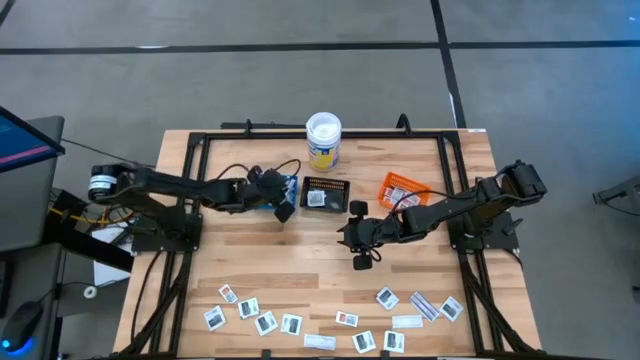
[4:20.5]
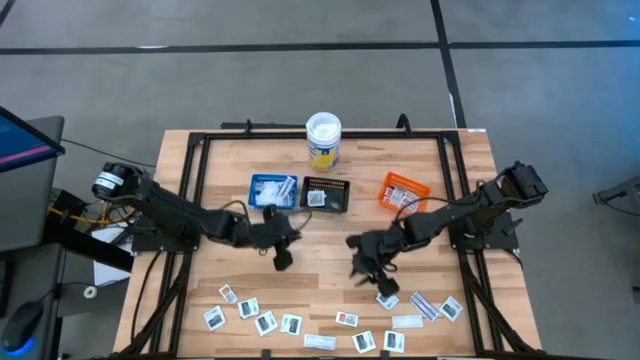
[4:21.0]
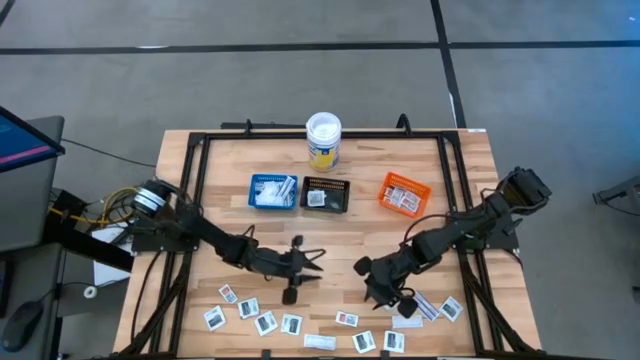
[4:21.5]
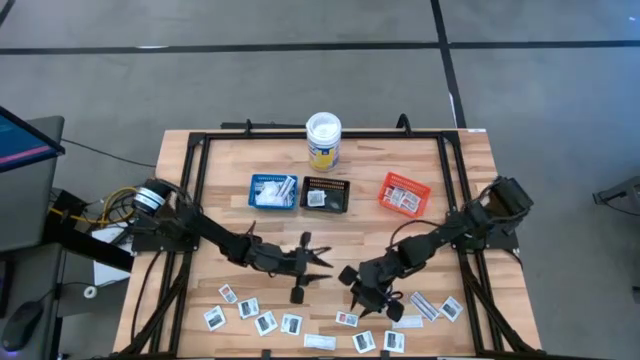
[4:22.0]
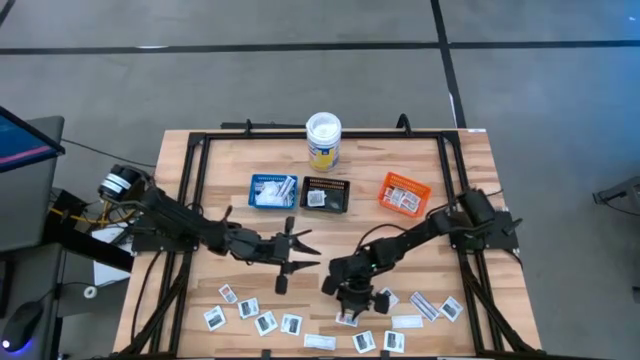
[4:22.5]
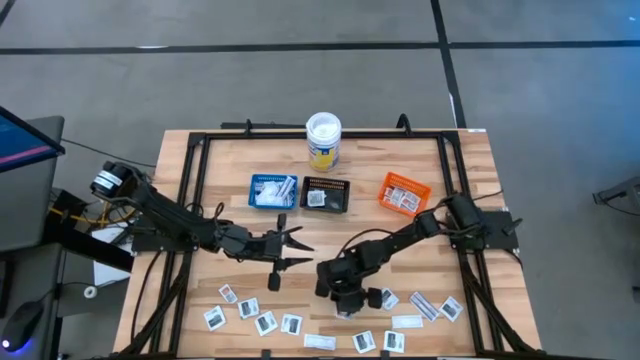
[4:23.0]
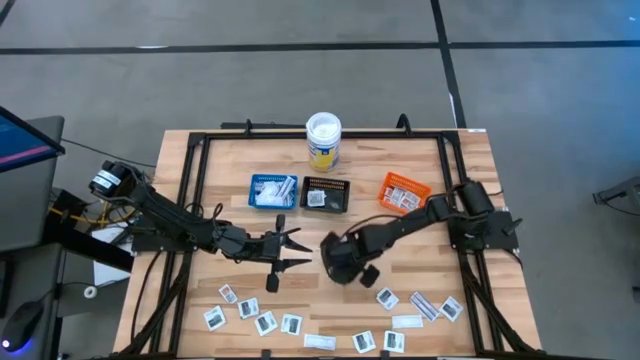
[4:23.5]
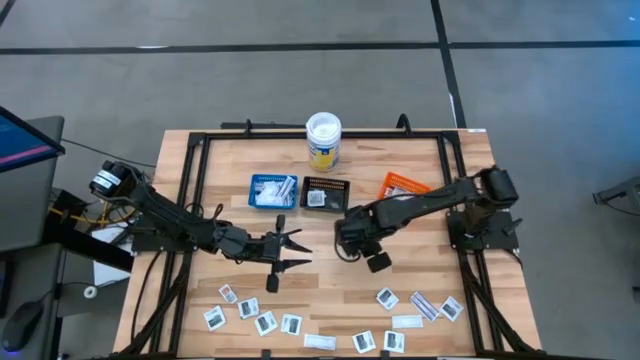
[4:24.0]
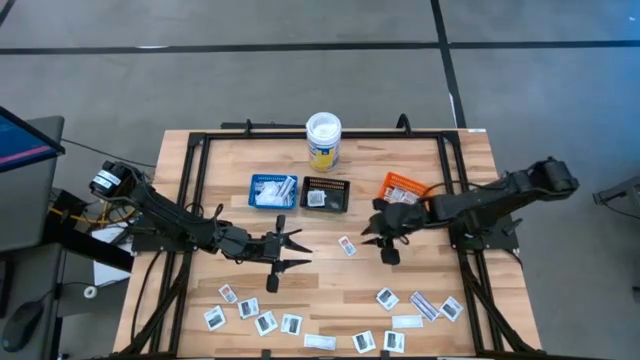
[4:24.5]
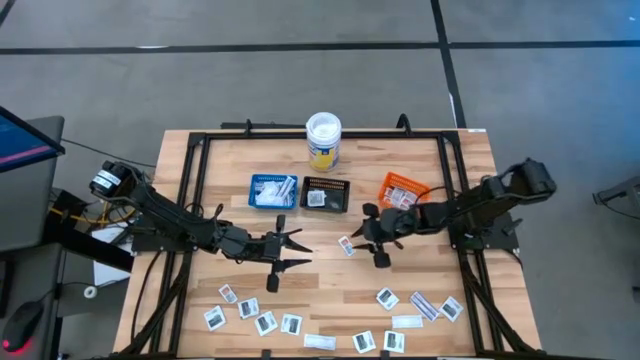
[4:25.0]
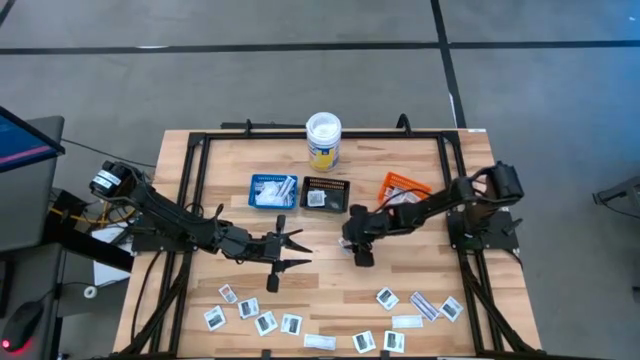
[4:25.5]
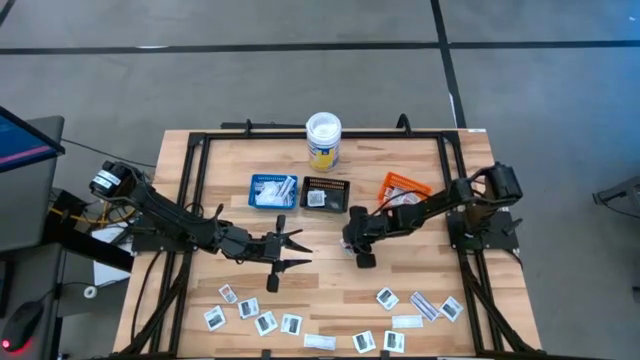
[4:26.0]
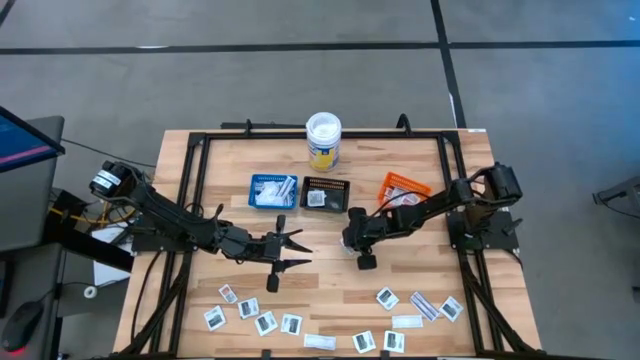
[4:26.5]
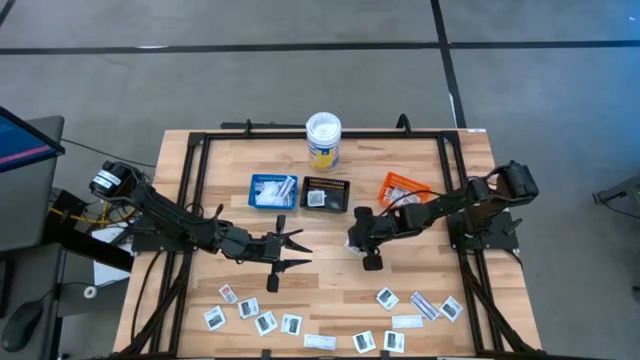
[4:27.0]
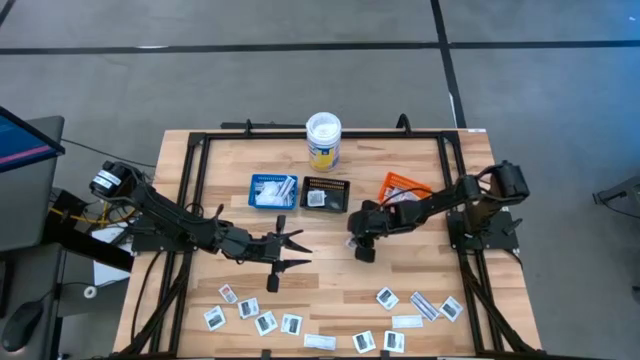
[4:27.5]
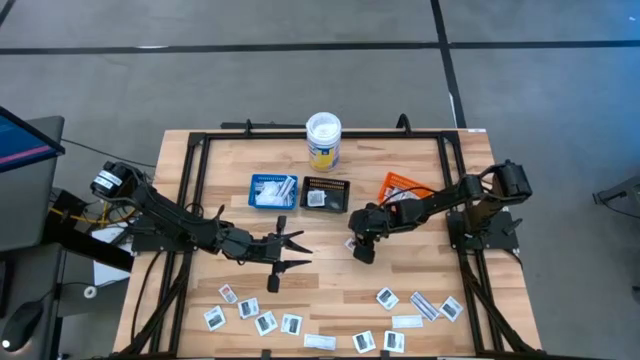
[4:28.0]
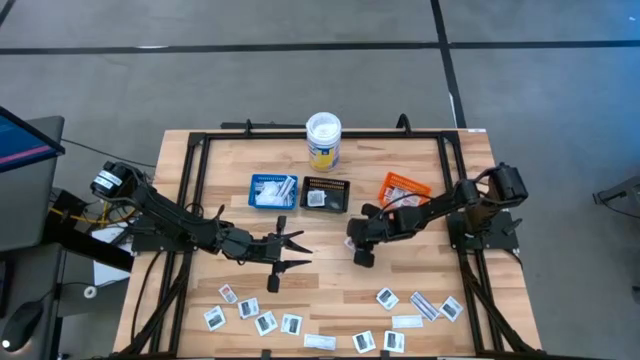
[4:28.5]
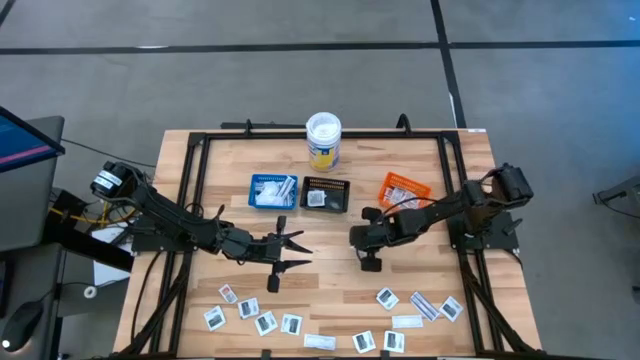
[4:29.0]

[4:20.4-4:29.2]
Task: Pick & Place First Aid Supplies
Put the orange ointment pack into the orange bin

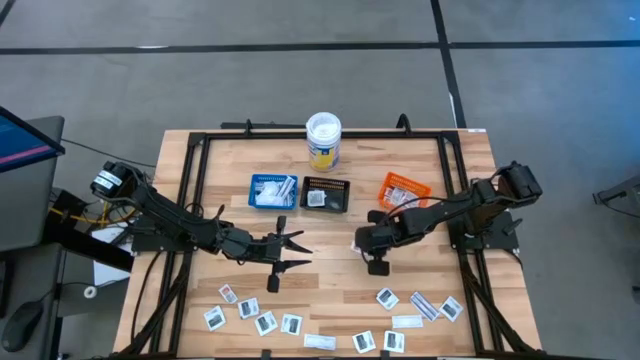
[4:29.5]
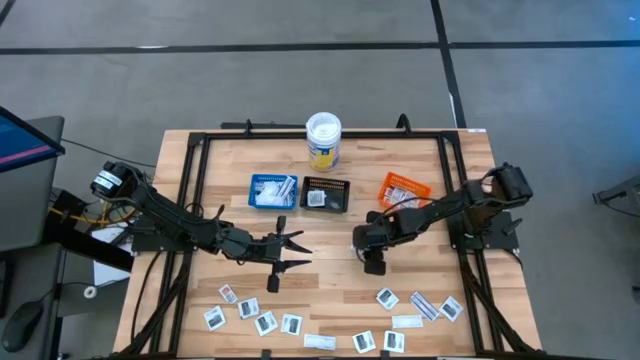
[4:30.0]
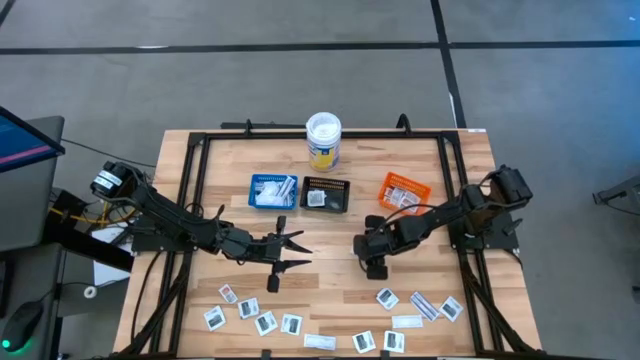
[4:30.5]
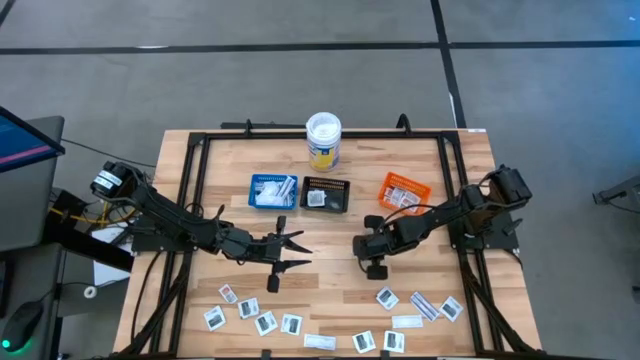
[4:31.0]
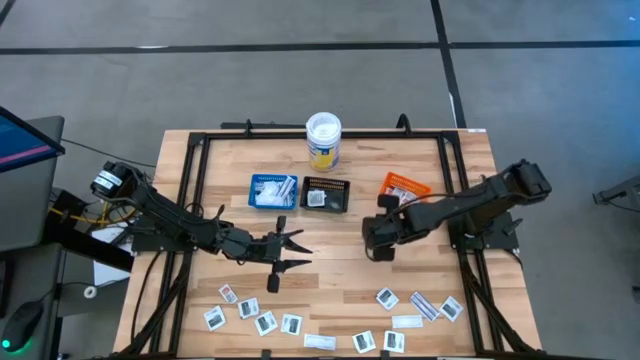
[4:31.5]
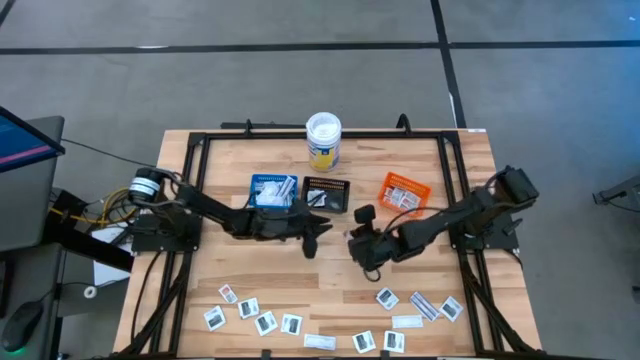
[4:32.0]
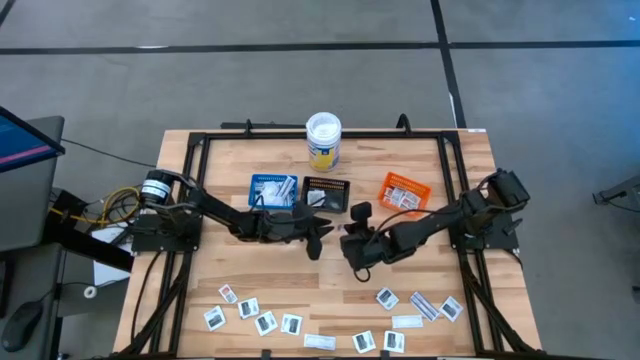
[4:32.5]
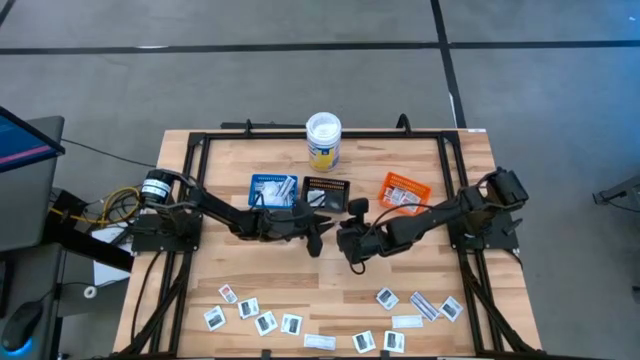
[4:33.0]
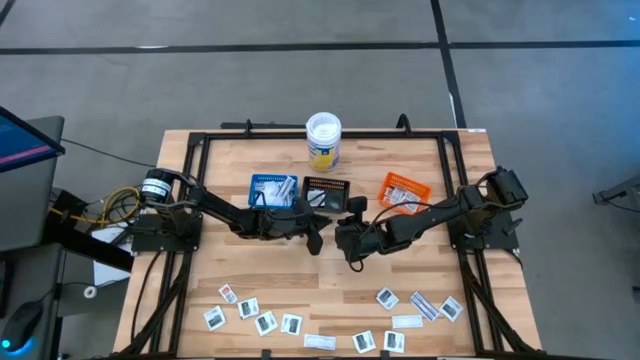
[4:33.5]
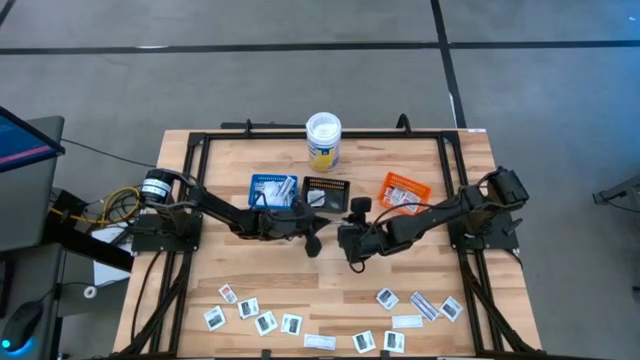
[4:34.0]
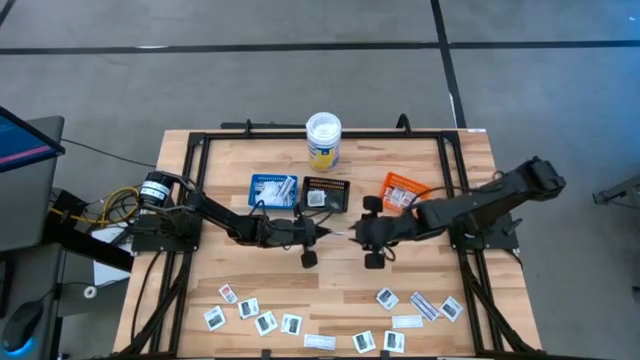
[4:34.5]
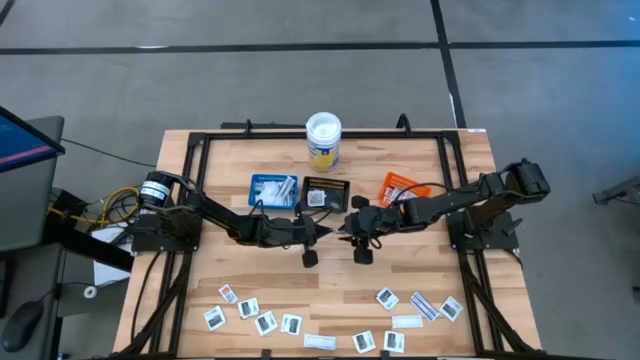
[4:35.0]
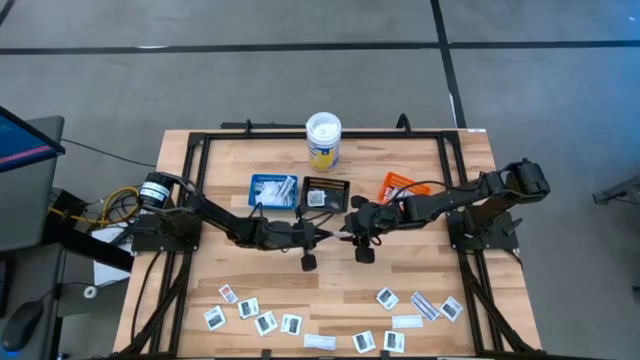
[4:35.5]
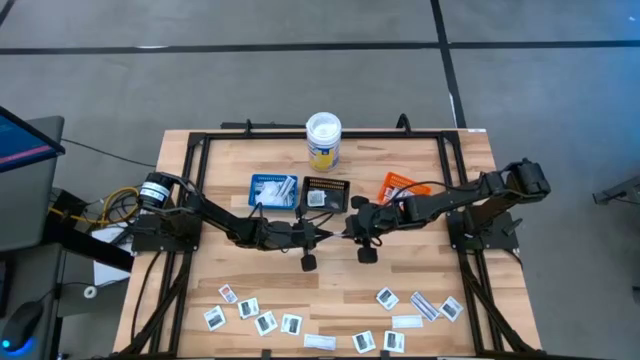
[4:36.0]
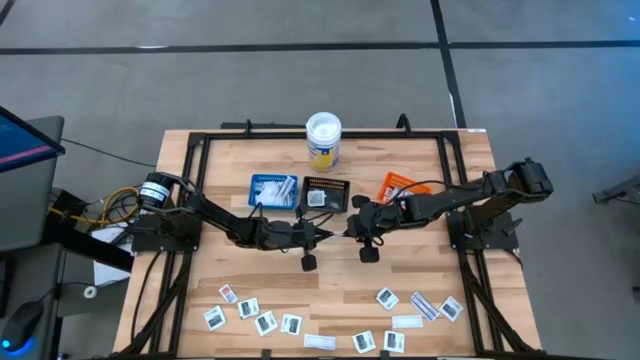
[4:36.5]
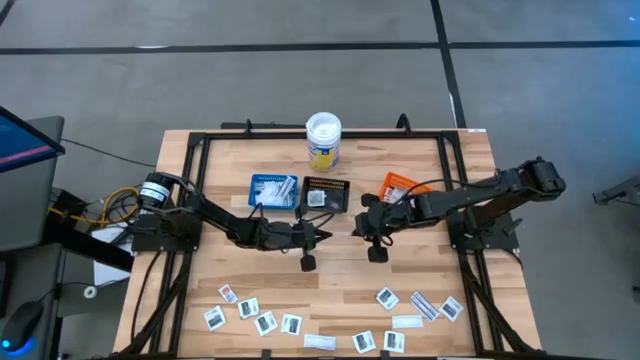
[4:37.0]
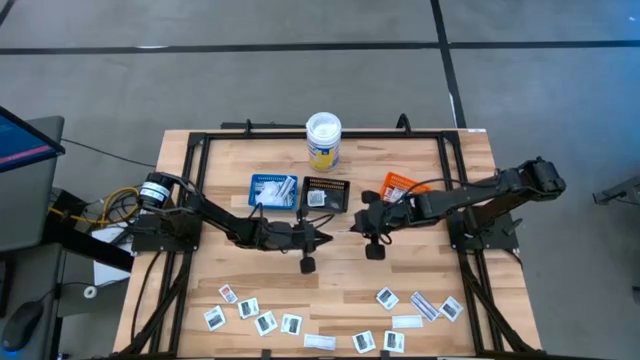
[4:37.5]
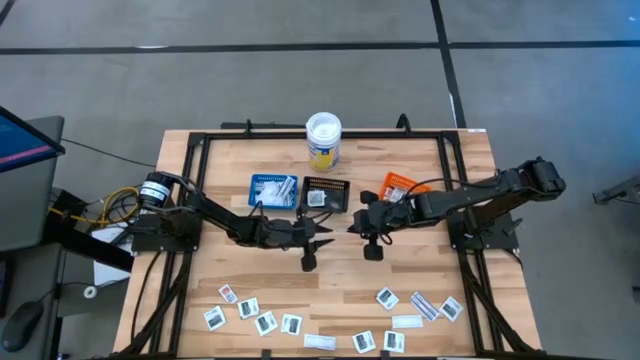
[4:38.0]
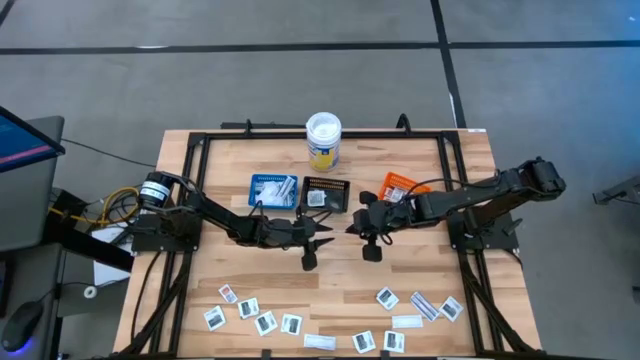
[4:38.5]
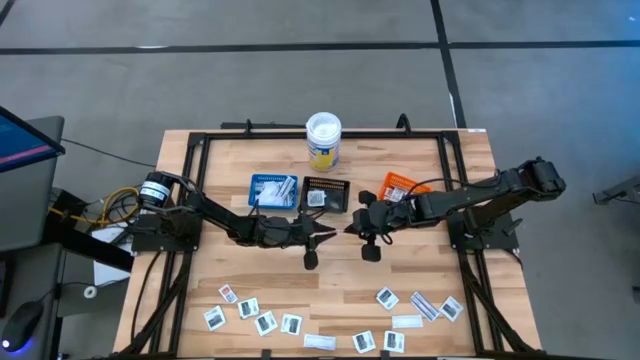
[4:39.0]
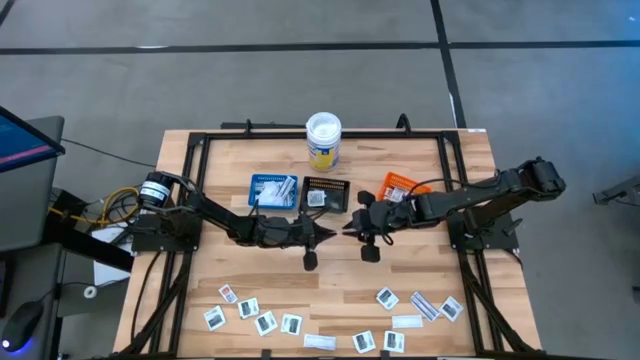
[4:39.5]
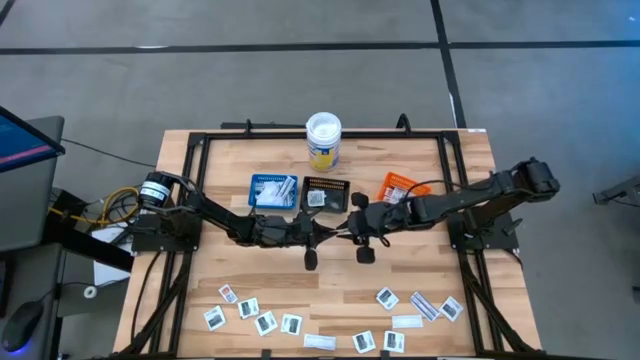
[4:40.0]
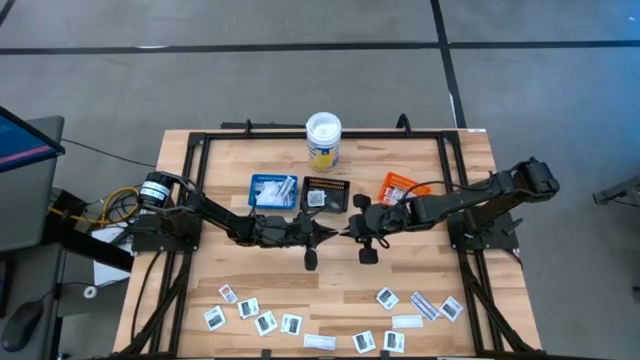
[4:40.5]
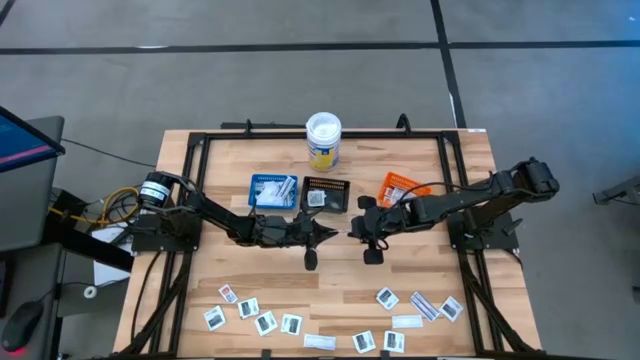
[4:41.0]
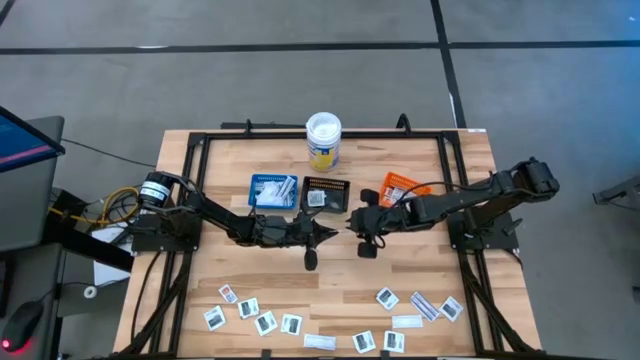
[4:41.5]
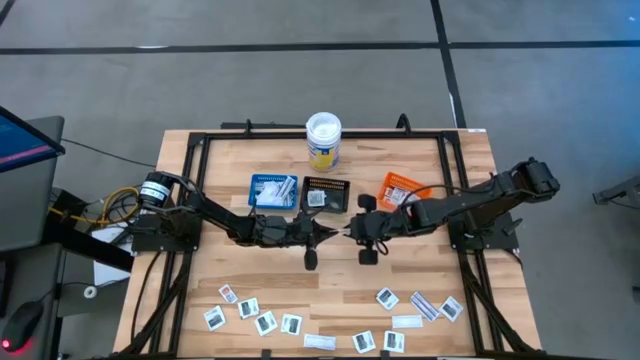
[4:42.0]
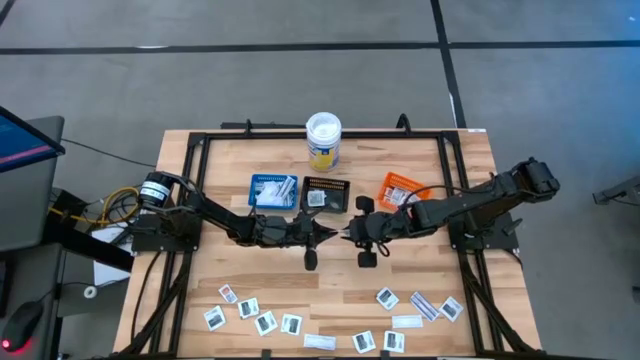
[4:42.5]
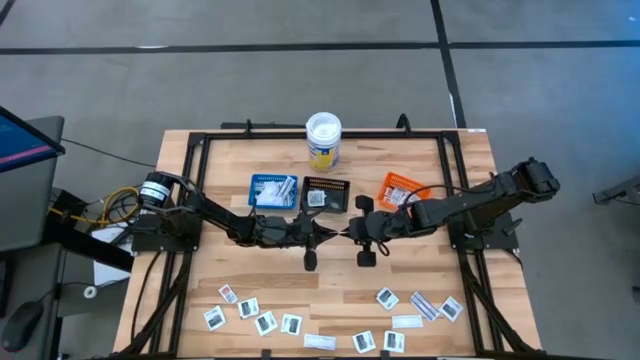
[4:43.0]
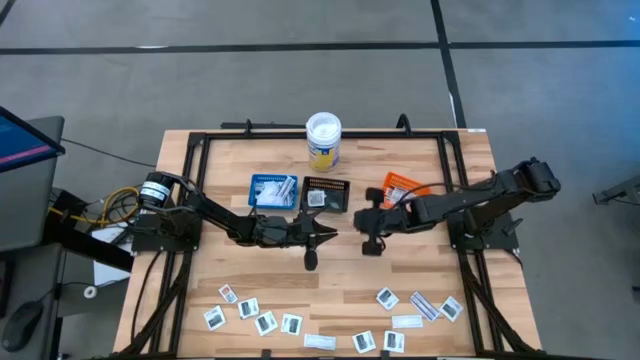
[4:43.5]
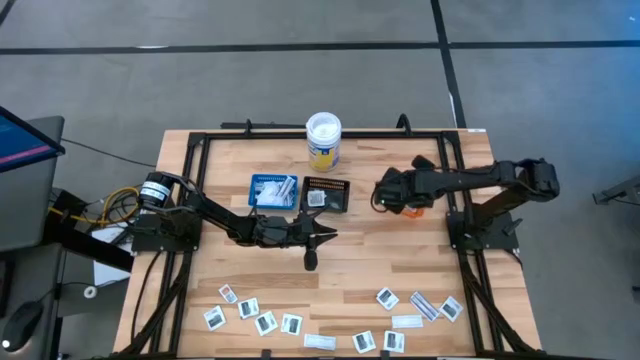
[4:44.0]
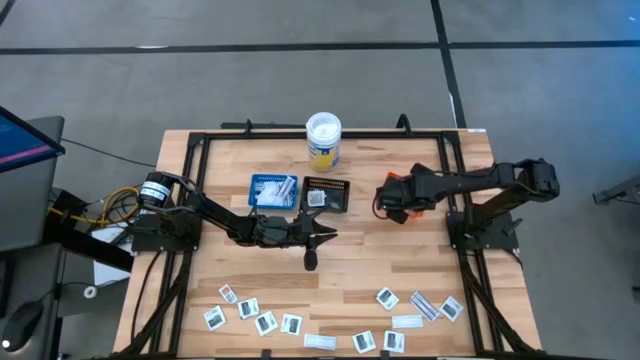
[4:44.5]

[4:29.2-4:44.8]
Put the orange ointment pack into the orange bin
